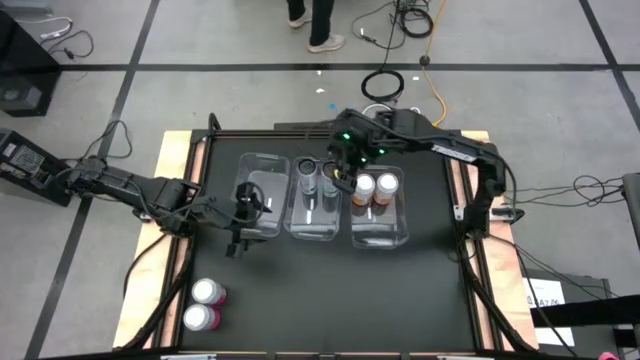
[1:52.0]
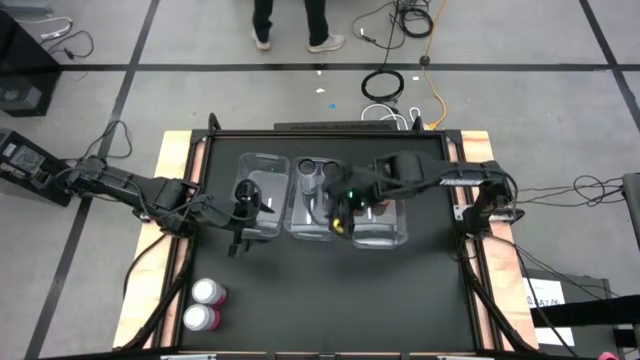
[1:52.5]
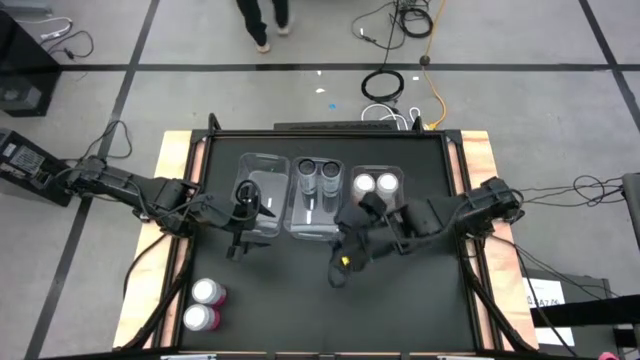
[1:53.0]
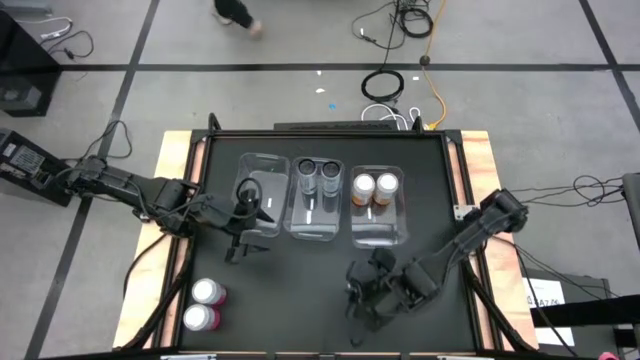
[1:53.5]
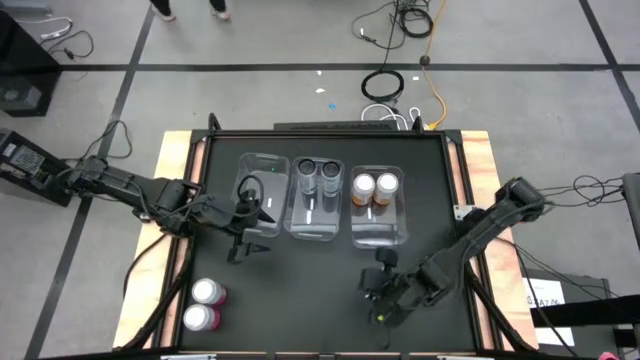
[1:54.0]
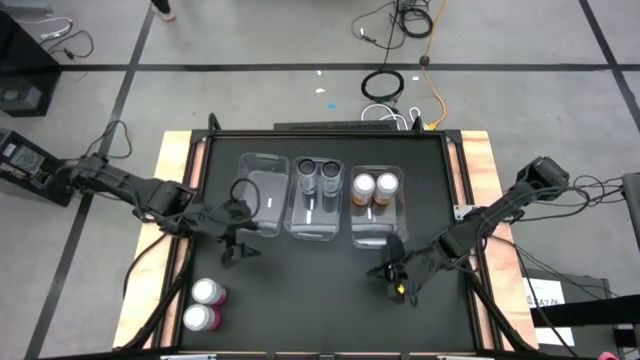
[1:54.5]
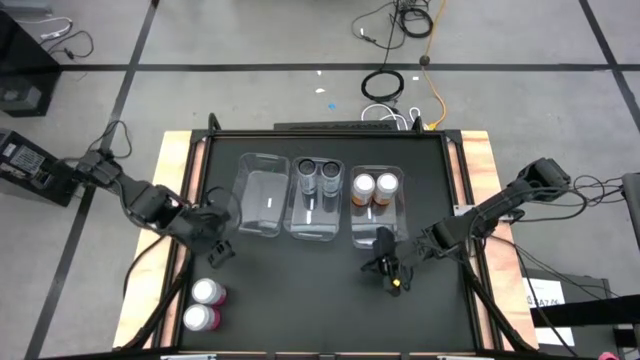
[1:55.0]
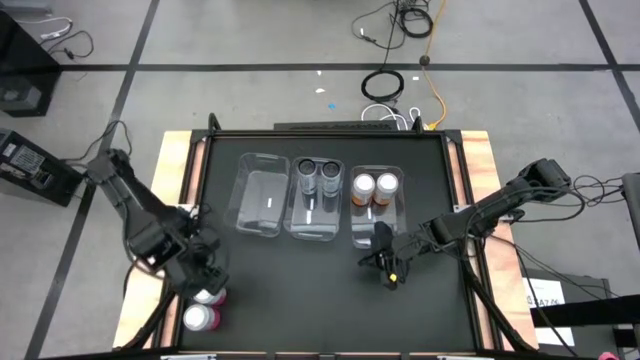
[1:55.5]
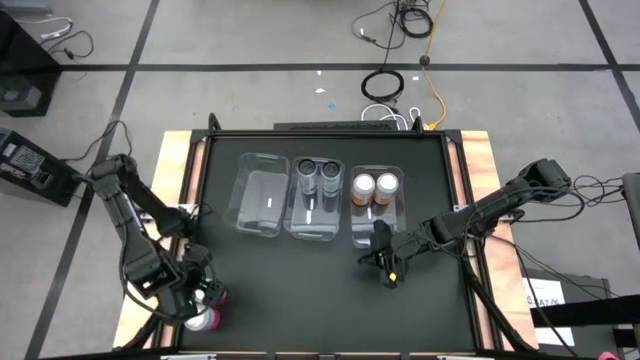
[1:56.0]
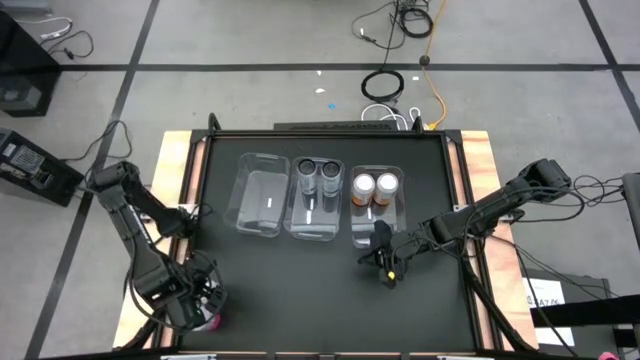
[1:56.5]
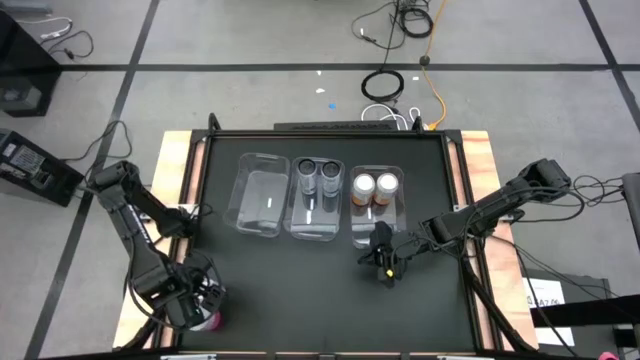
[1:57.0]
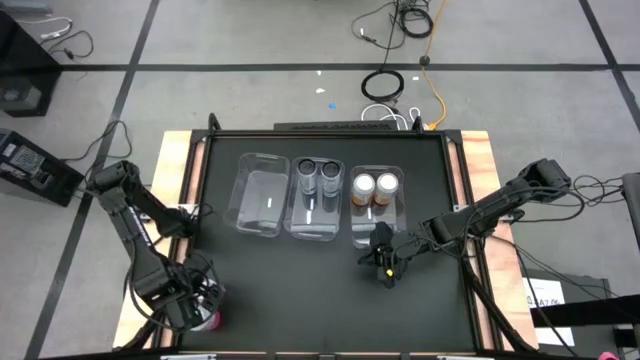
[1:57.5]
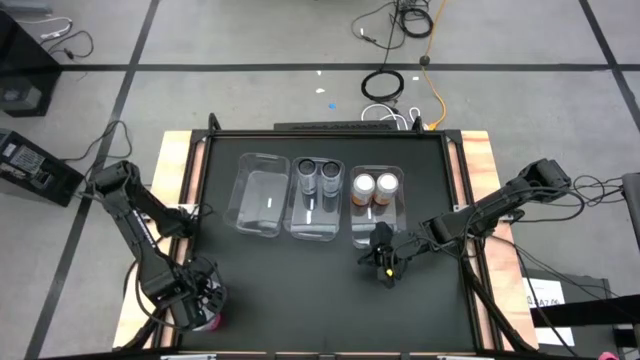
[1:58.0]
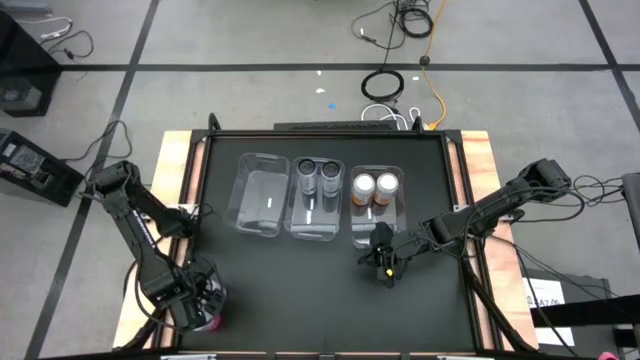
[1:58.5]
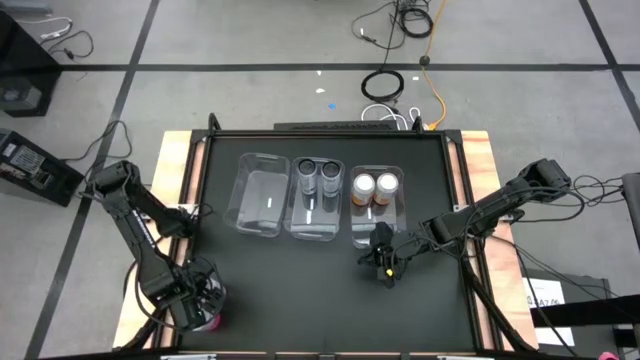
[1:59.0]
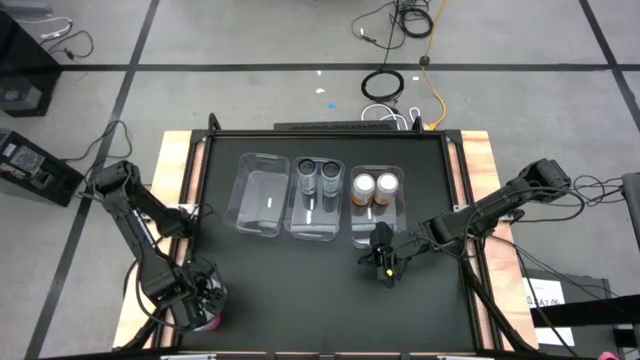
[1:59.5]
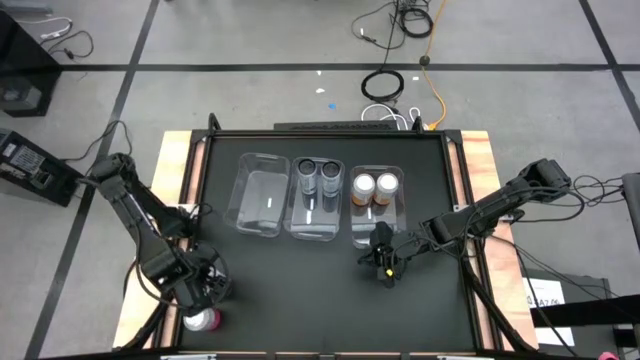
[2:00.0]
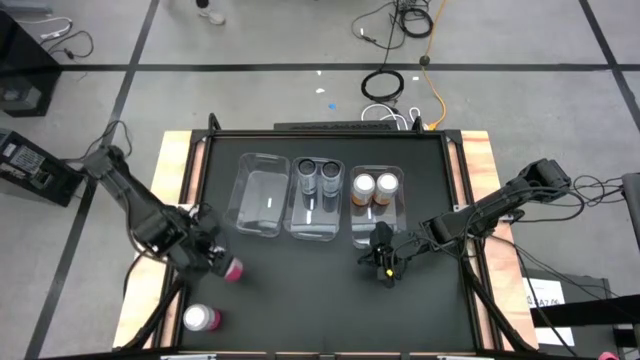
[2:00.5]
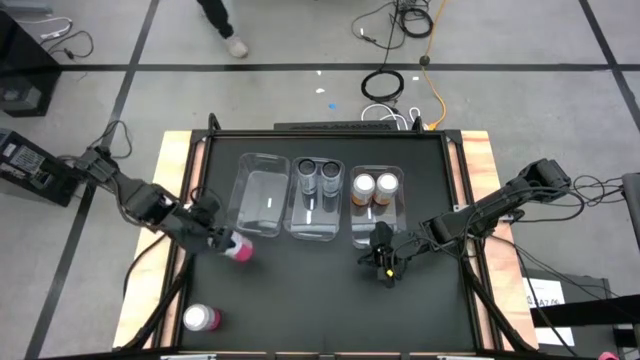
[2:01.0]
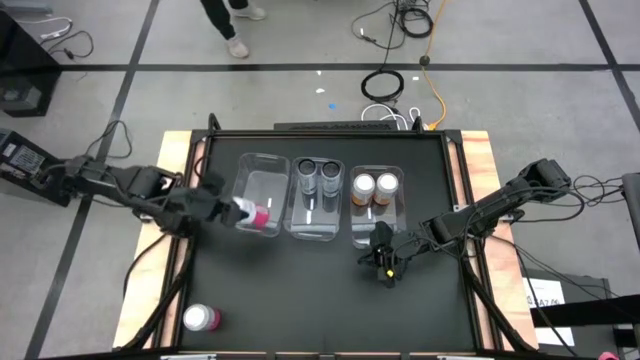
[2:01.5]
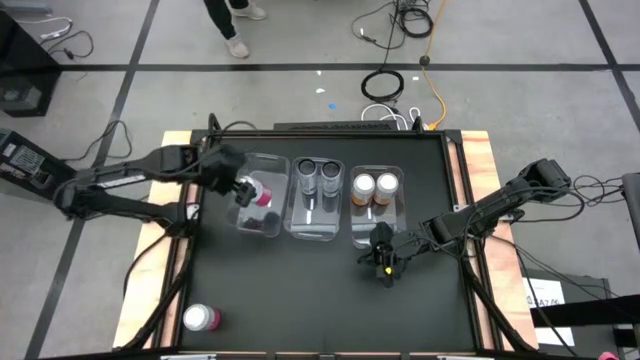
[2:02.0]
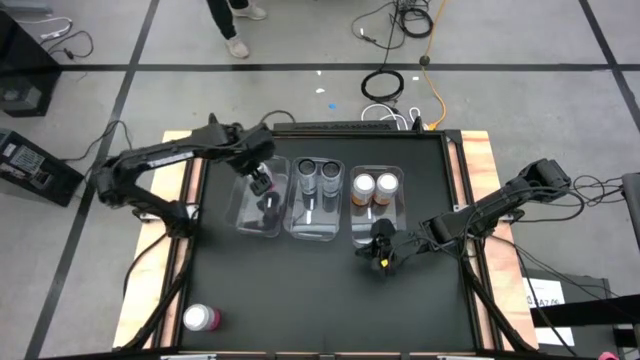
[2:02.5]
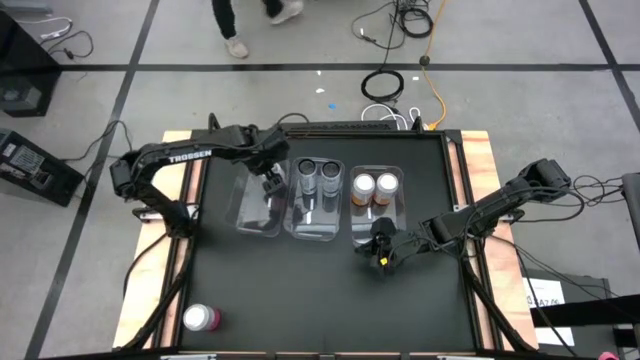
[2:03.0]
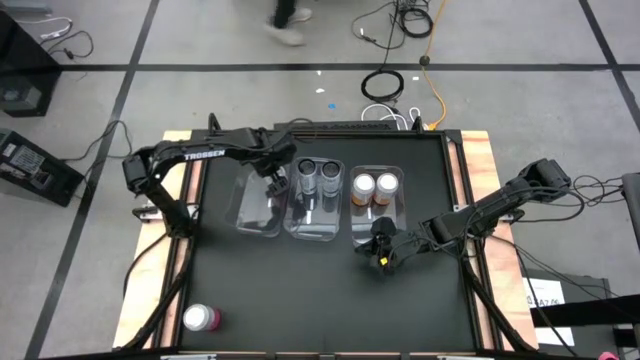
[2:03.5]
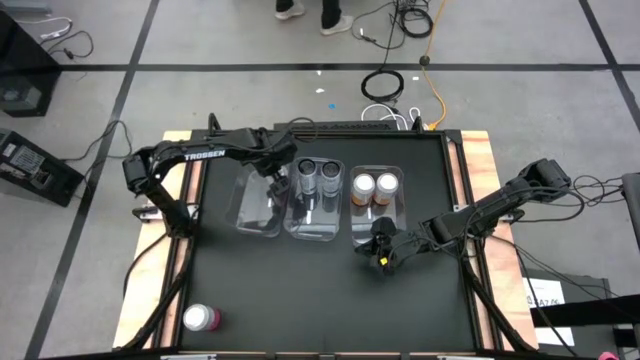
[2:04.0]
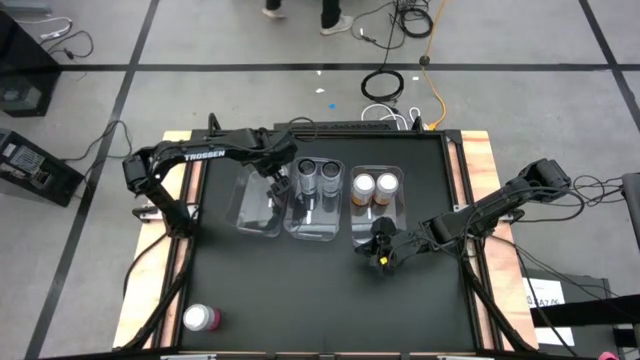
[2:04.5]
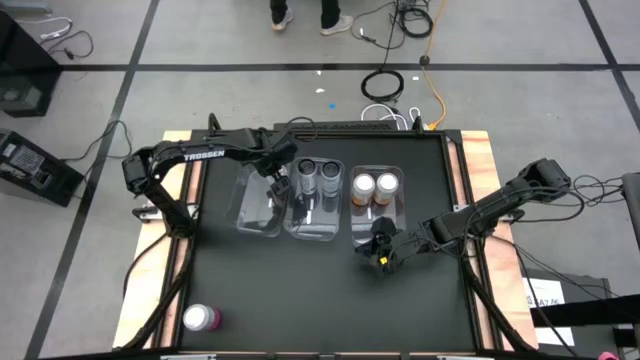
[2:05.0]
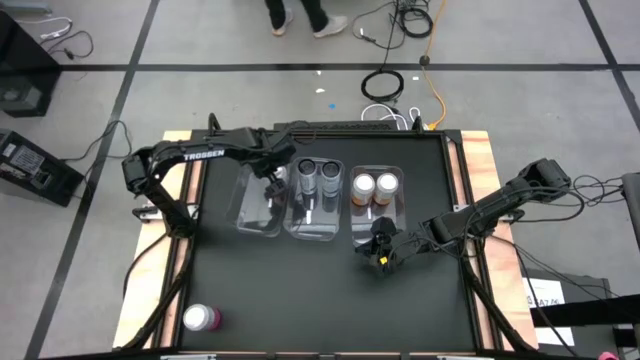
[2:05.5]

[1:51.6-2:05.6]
Task: Sort soda cans
Put the top pink-white soda can into the left transparent bin

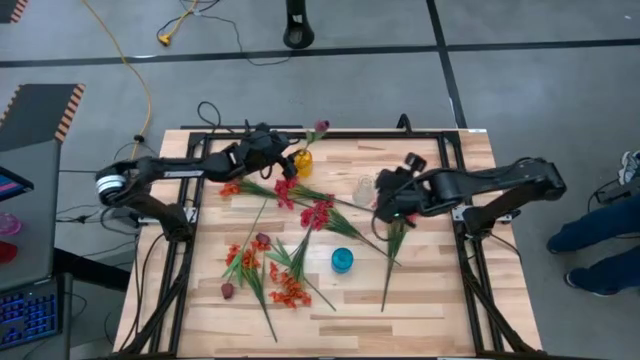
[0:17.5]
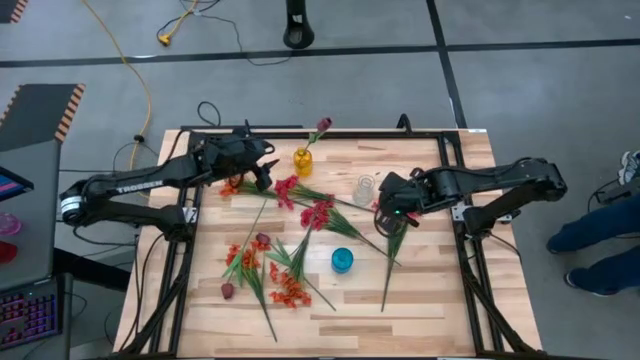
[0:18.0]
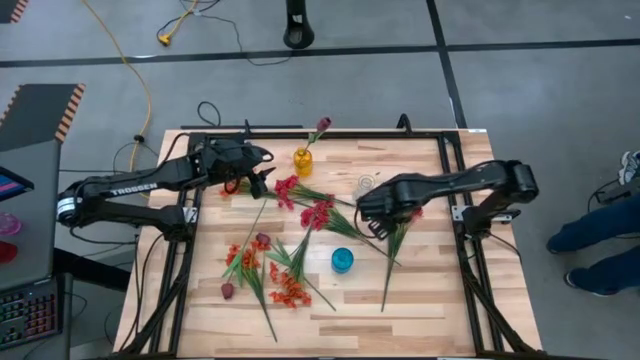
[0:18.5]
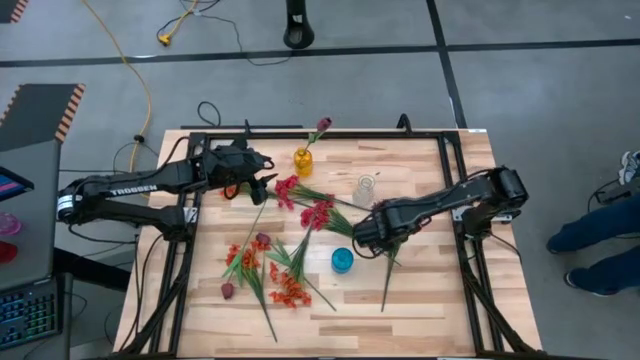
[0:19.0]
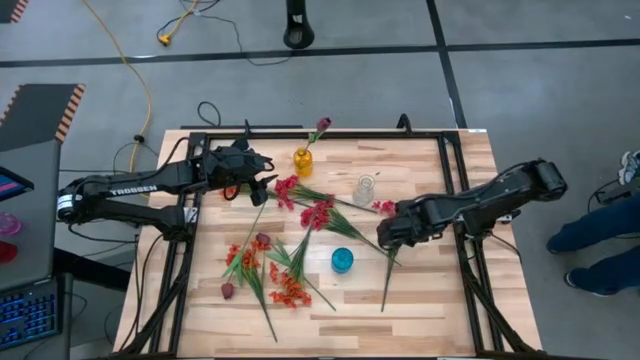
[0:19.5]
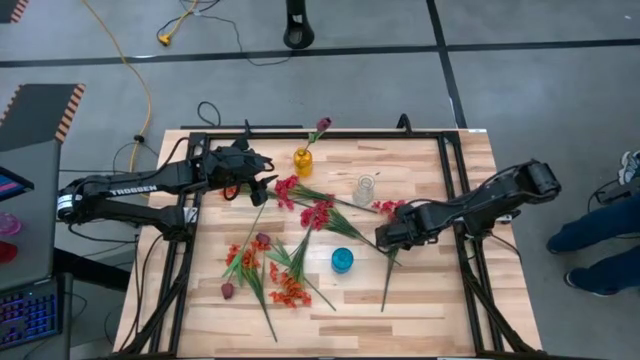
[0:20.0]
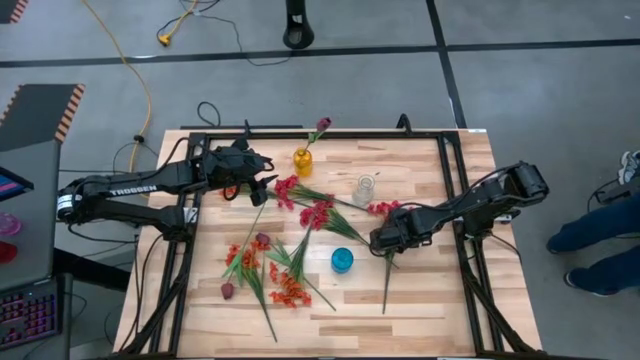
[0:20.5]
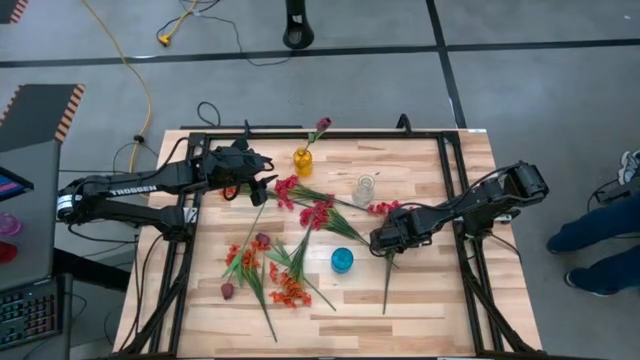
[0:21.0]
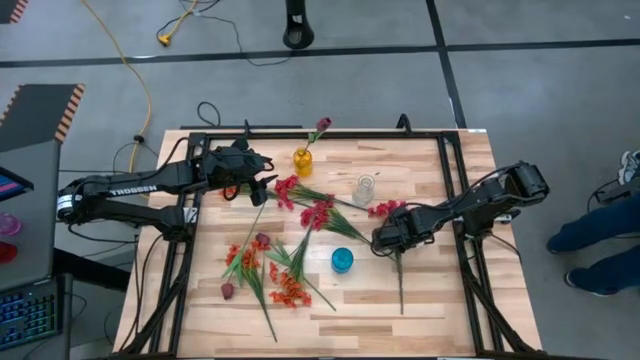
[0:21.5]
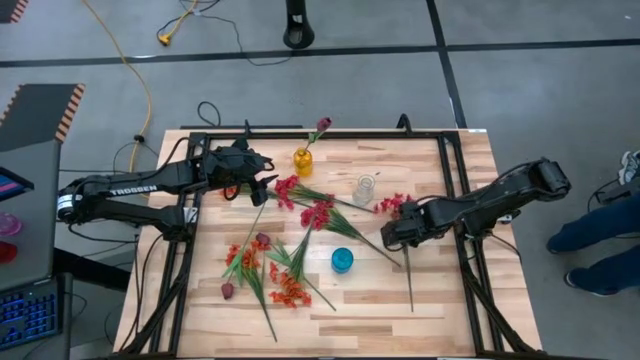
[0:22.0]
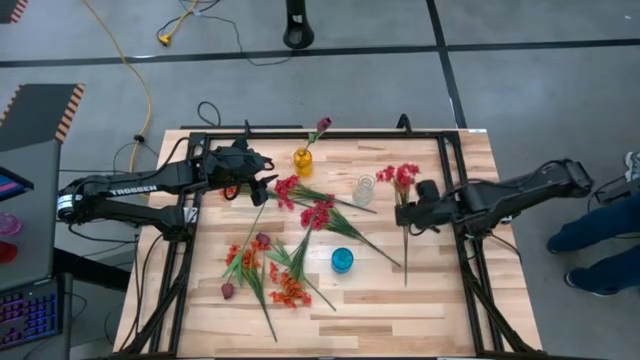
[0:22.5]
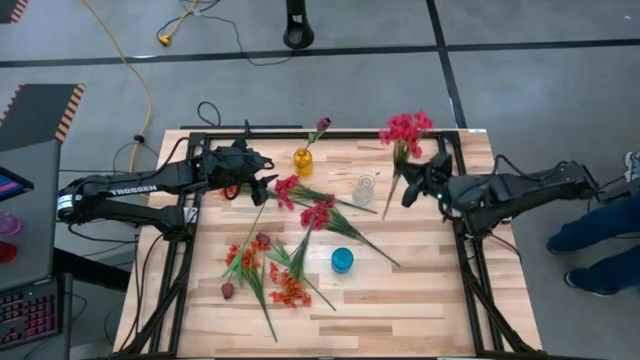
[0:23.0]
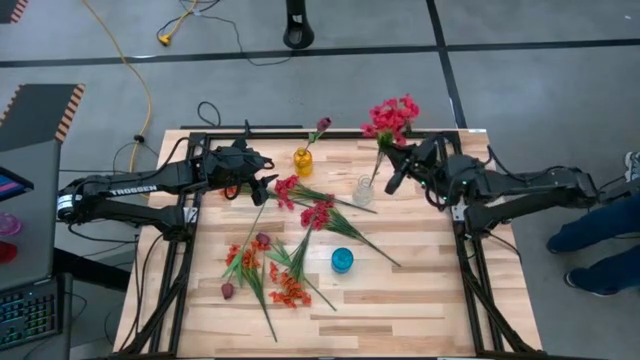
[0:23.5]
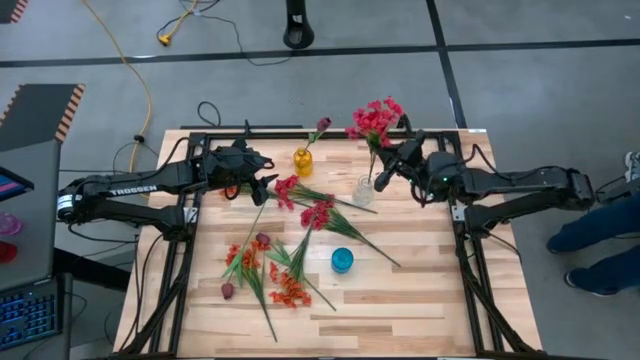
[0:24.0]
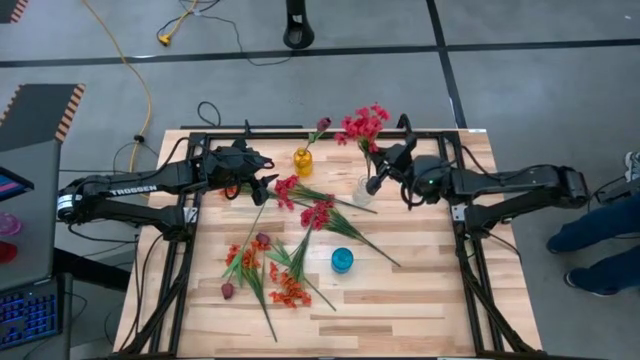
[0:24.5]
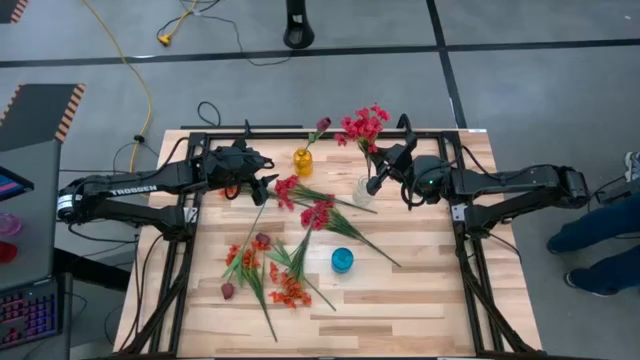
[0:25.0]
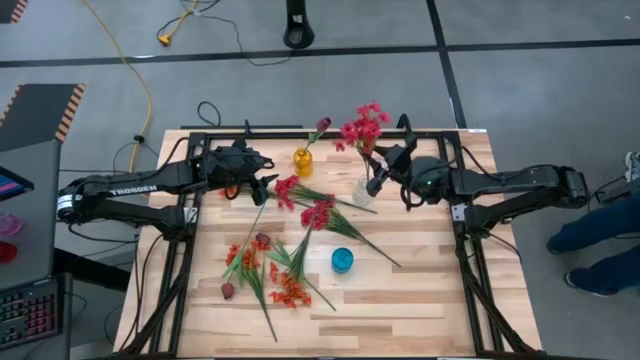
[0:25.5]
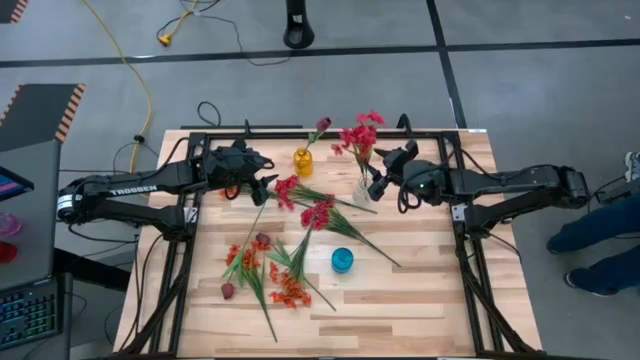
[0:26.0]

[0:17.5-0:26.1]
Task: Sort flowers into vase by color
Put the bottom right red flowers into the transparent vase
